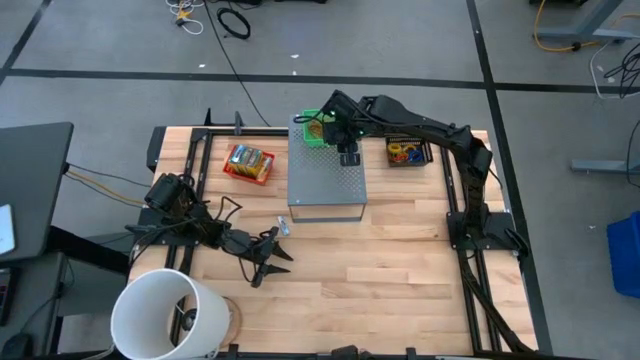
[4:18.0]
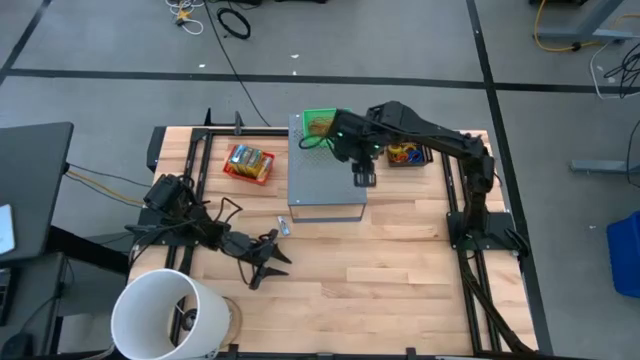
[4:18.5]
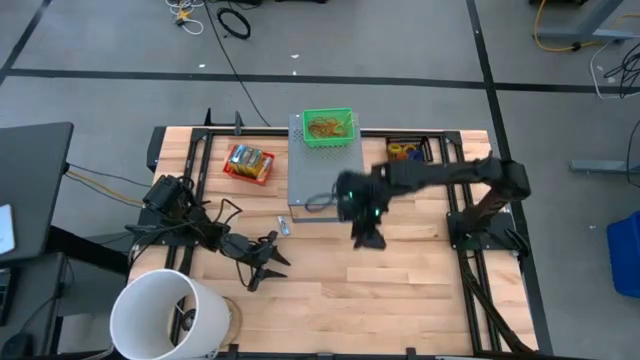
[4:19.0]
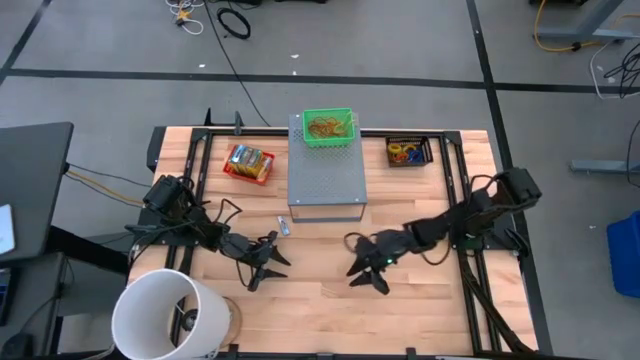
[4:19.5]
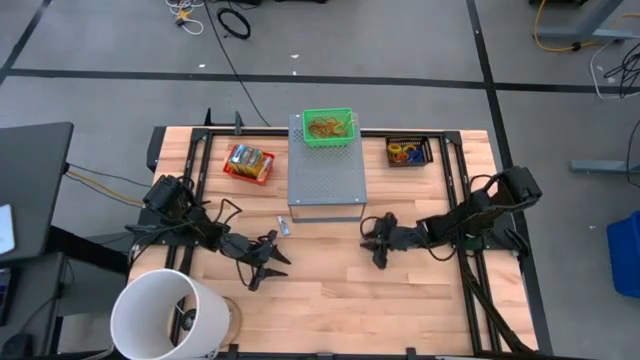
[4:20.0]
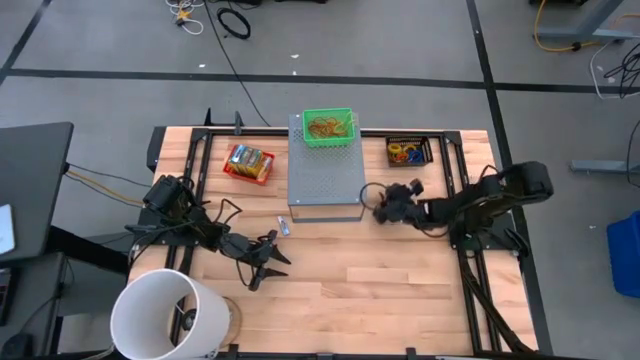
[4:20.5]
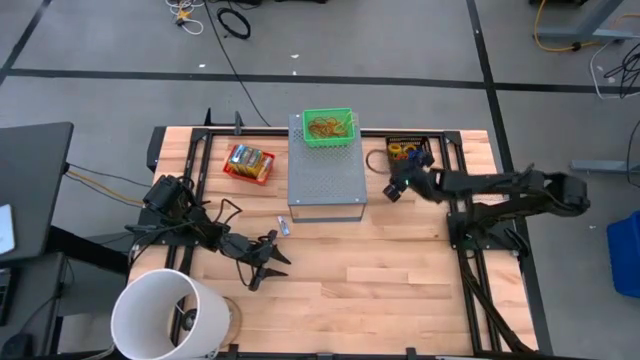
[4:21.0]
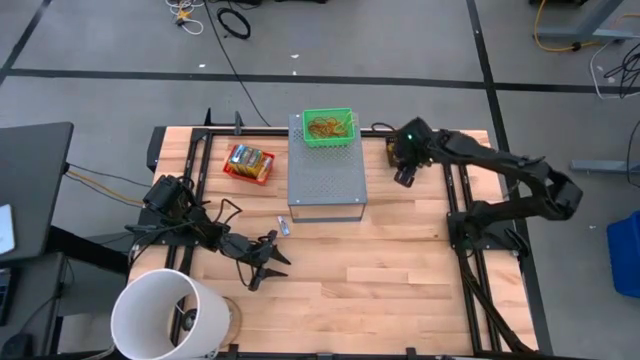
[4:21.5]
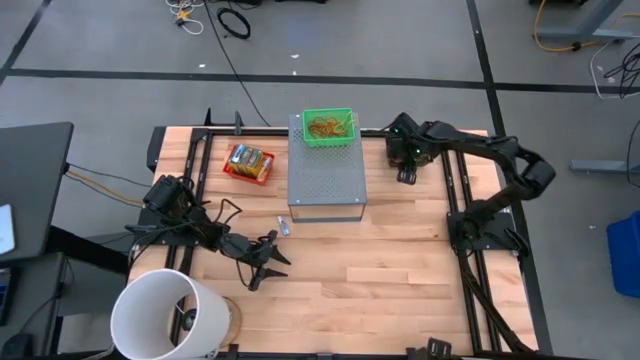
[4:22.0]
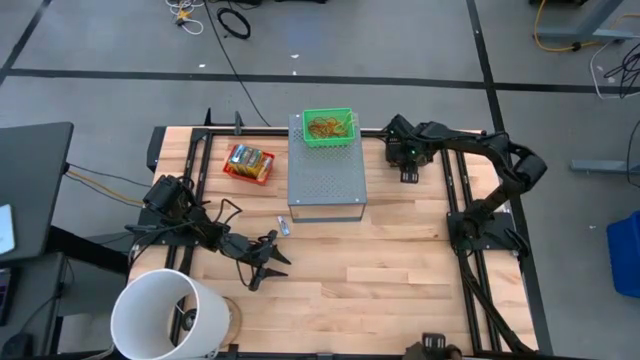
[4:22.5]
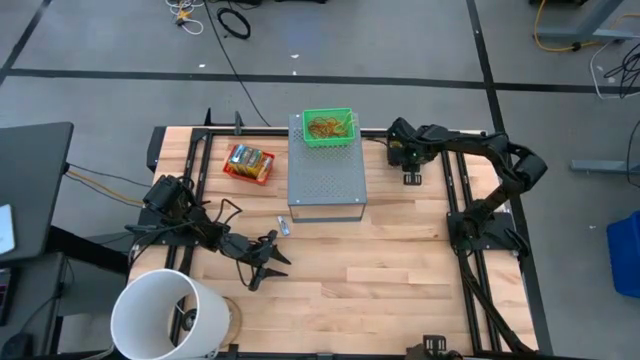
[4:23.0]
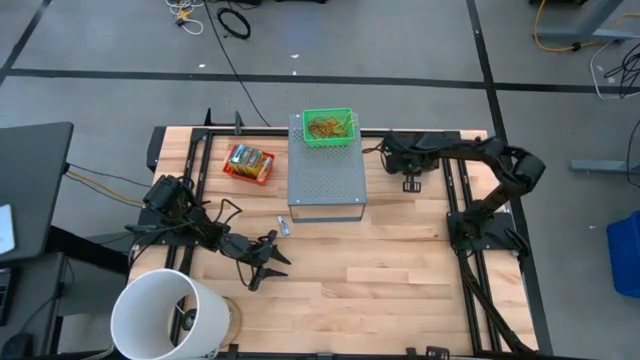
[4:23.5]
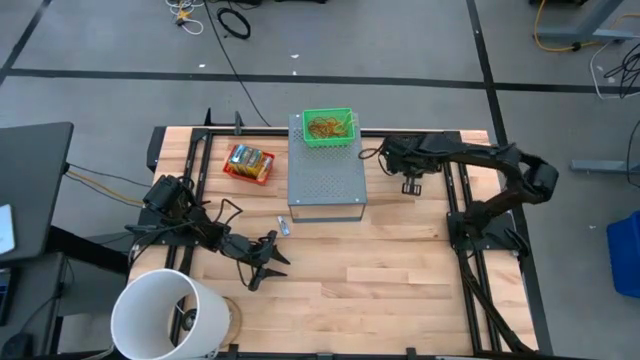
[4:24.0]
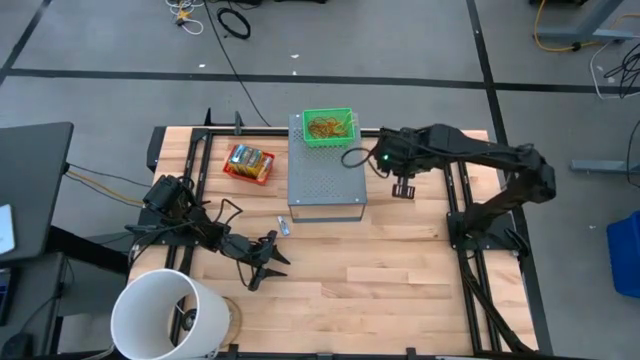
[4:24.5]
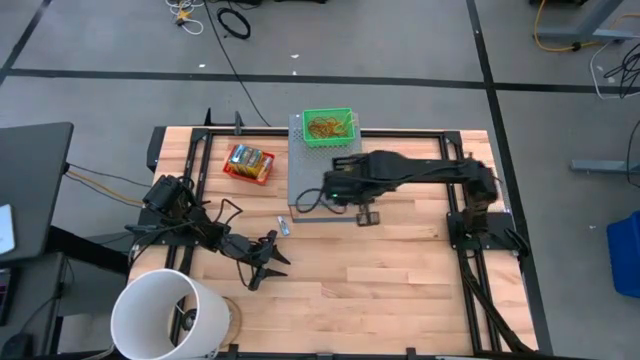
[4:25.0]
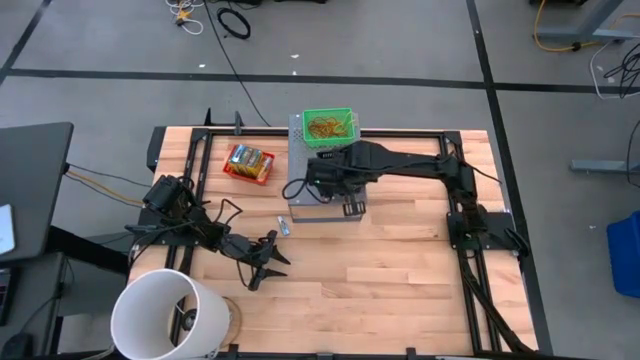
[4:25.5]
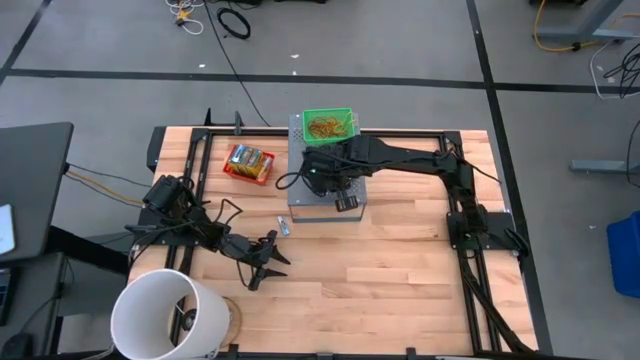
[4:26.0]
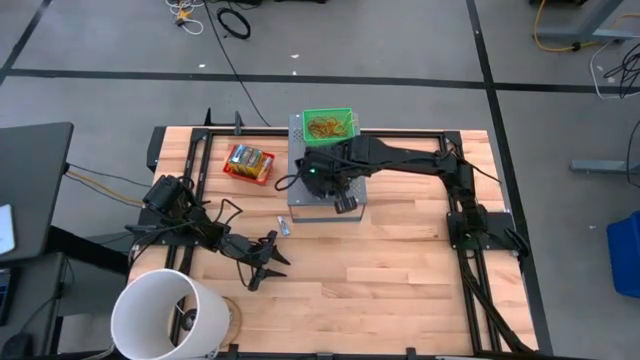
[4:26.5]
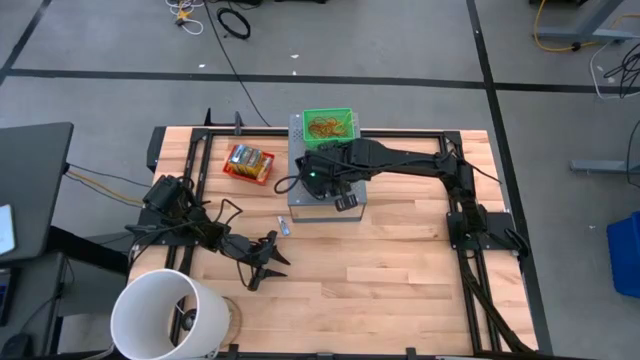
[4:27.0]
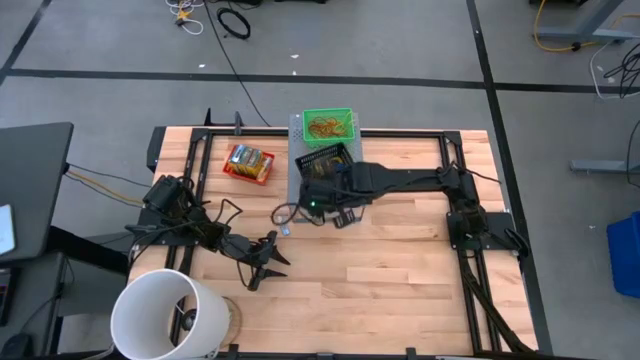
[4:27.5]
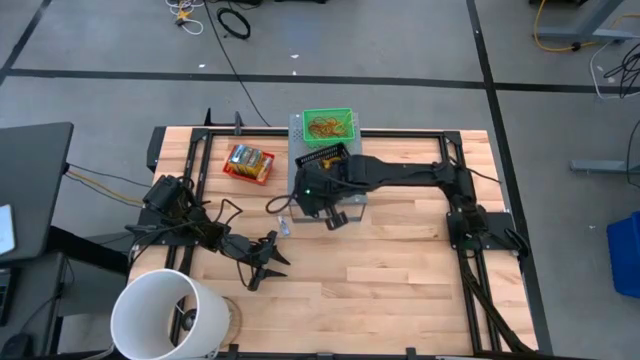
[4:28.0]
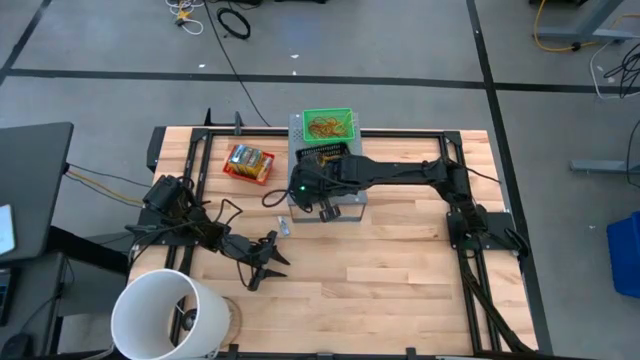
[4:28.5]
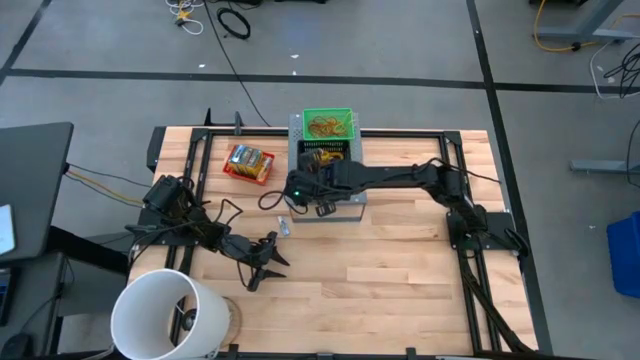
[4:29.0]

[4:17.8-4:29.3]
Task: Pick & Place Office Desk Supplies
Put the black basket on the shelf

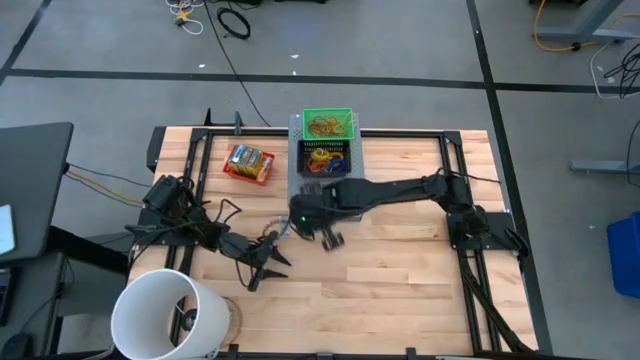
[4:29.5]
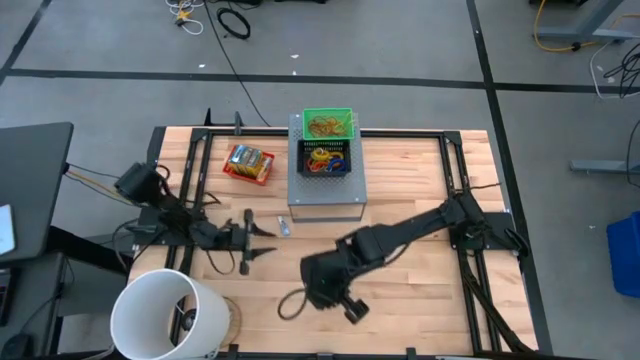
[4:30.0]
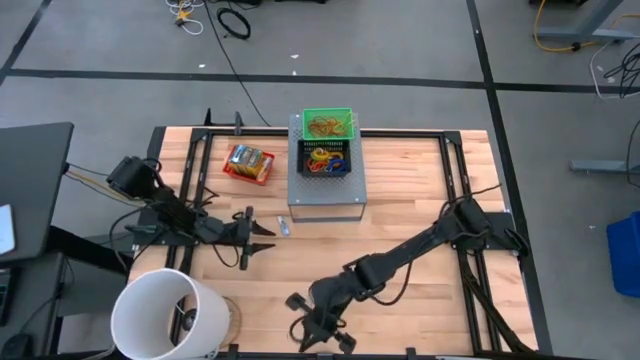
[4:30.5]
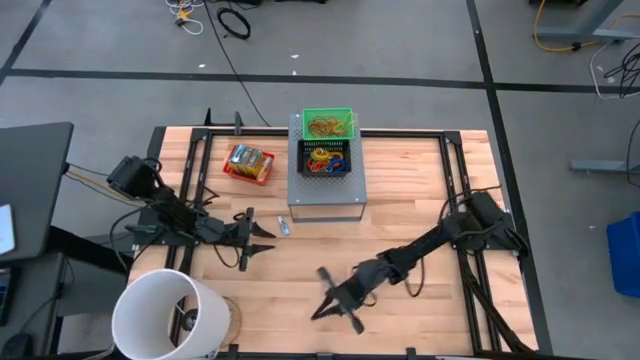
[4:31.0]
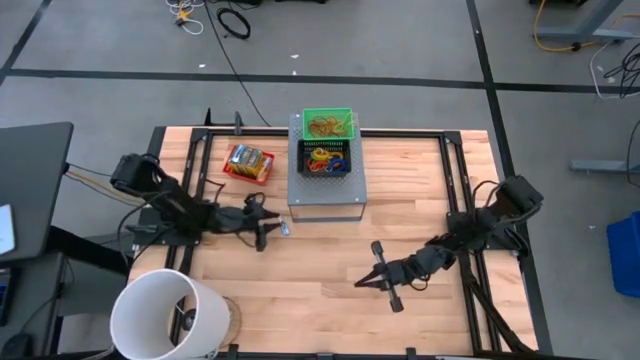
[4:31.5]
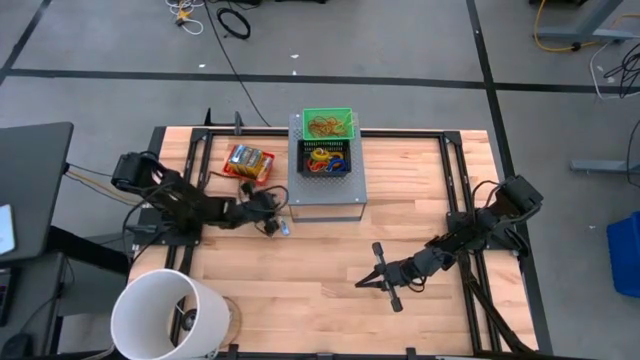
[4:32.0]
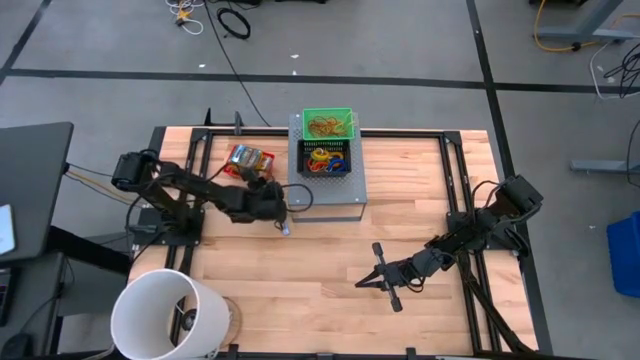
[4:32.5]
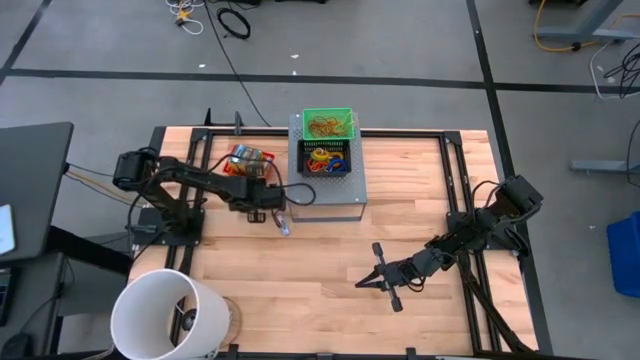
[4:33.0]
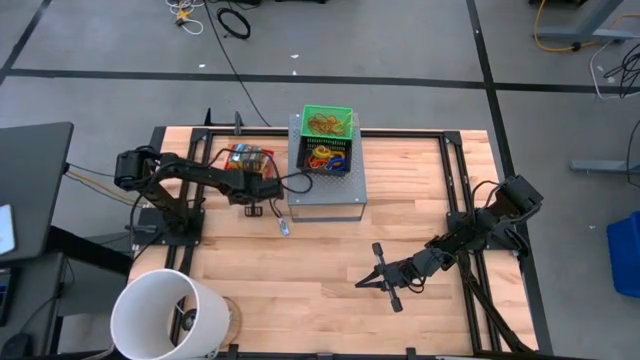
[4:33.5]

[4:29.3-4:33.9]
Move the red basket to the center of the table

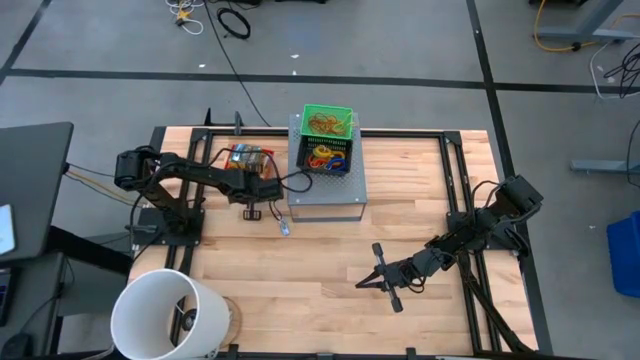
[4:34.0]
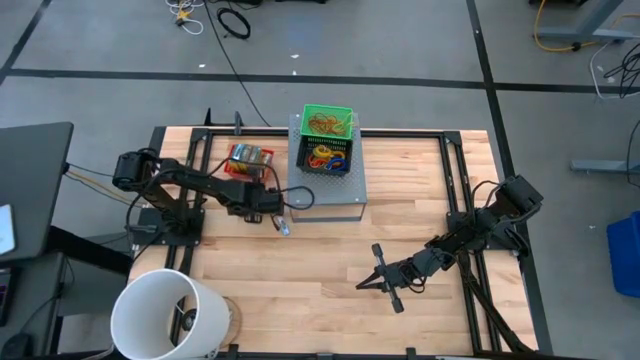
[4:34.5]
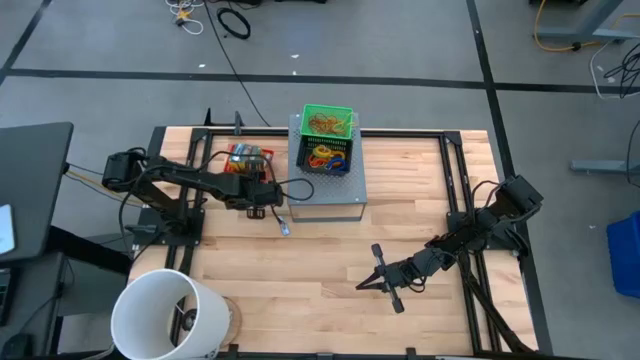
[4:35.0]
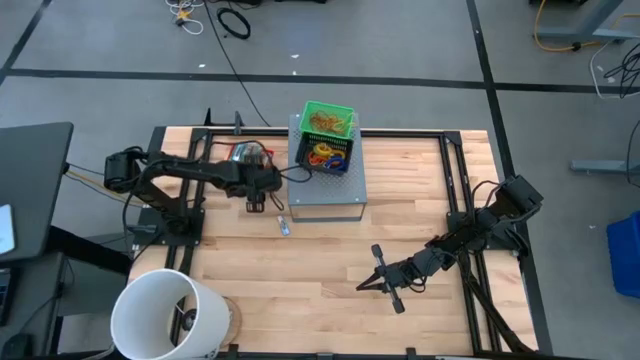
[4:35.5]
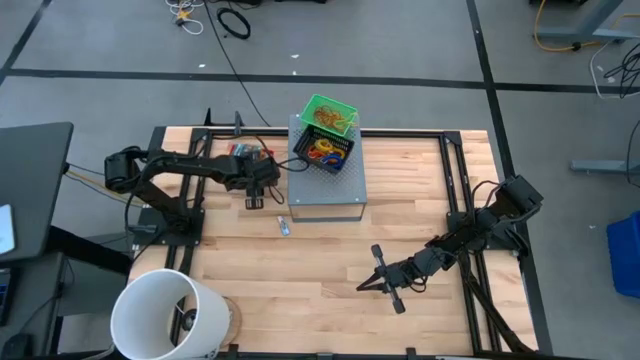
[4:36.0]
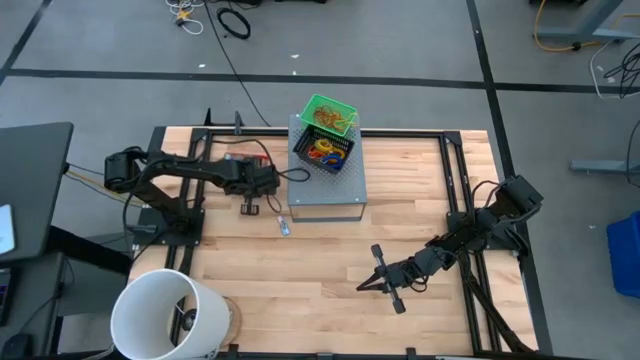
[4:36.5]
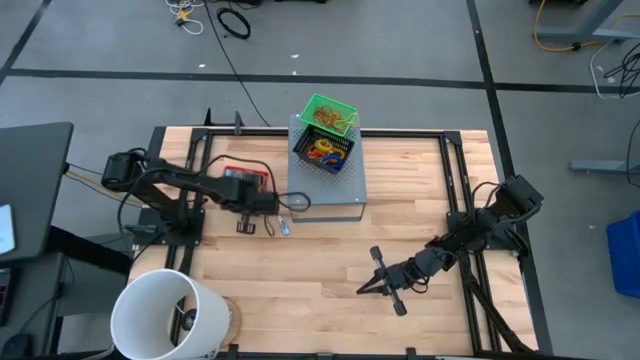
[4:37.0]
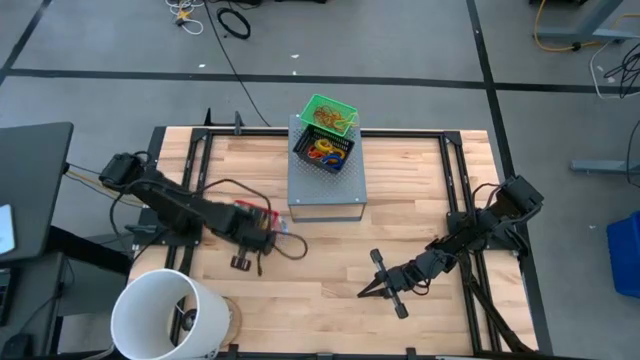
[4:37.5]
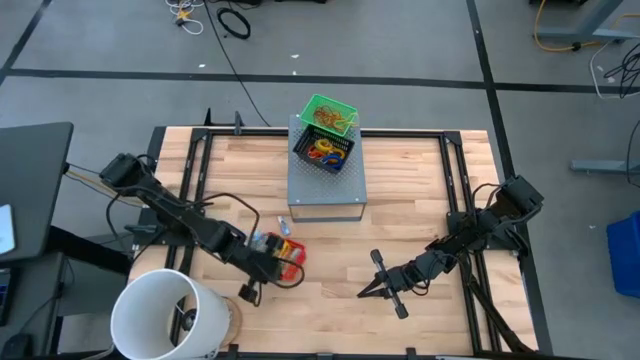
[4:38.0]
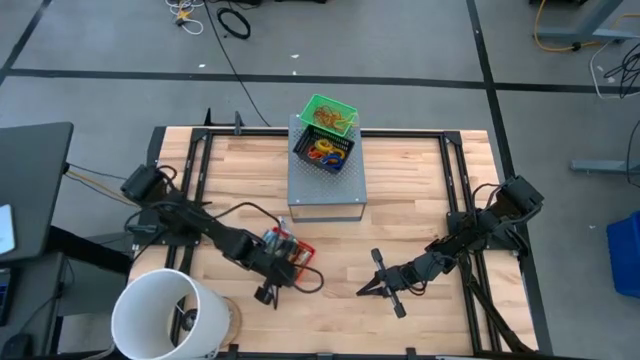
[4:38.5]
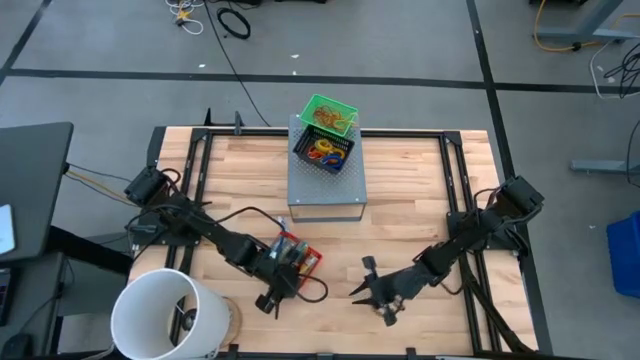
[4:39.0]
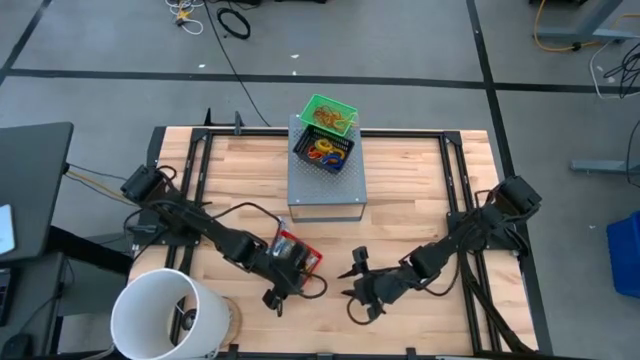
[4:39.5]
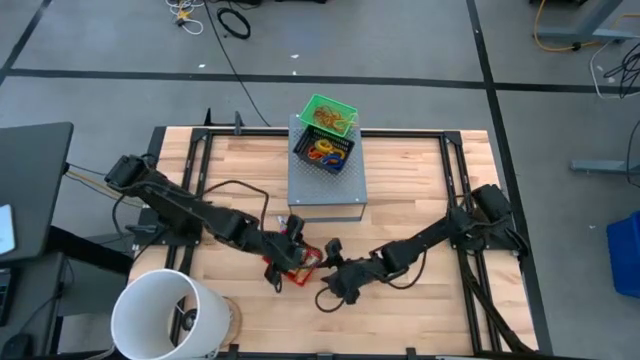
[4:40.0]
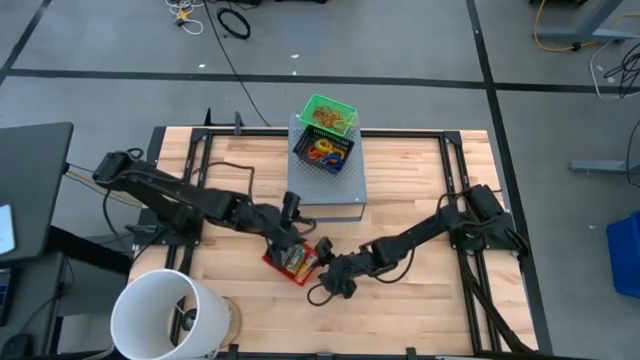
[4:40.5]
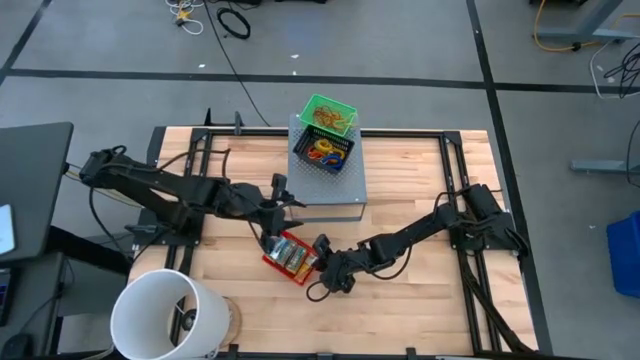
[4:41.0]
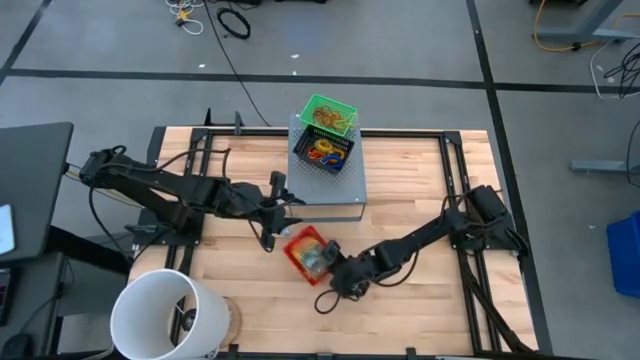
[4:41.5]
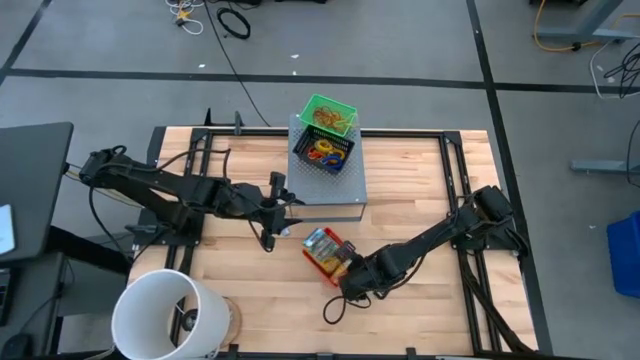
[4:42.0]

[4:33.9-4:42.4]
Move the red basket to the center of the table
